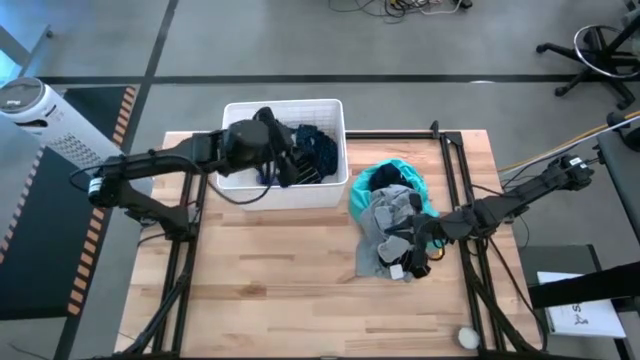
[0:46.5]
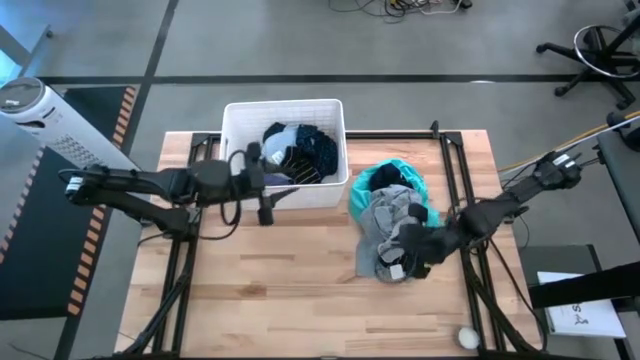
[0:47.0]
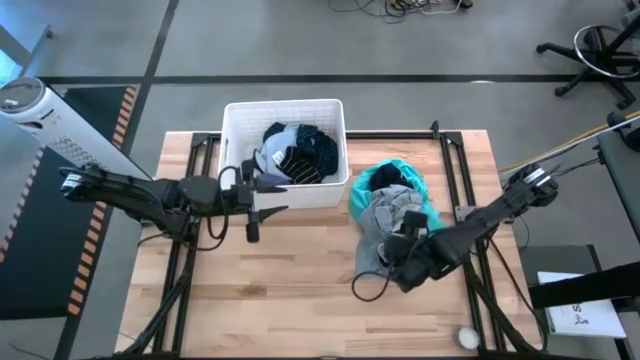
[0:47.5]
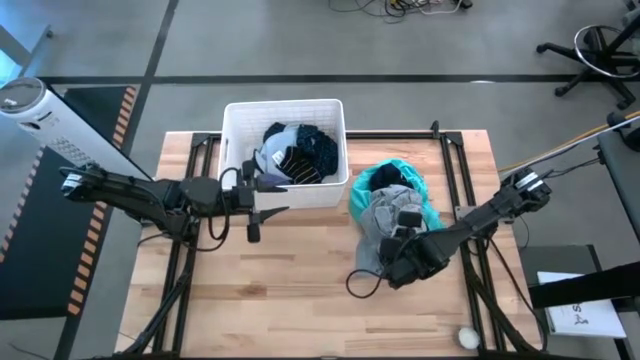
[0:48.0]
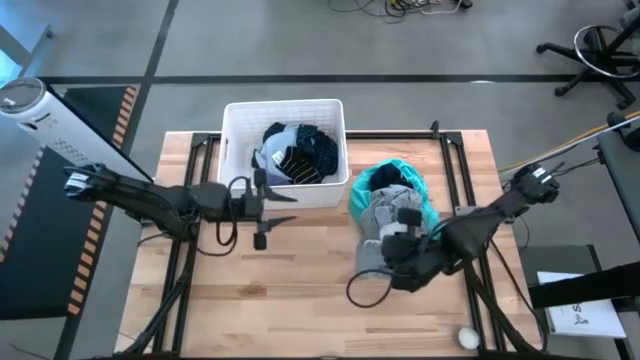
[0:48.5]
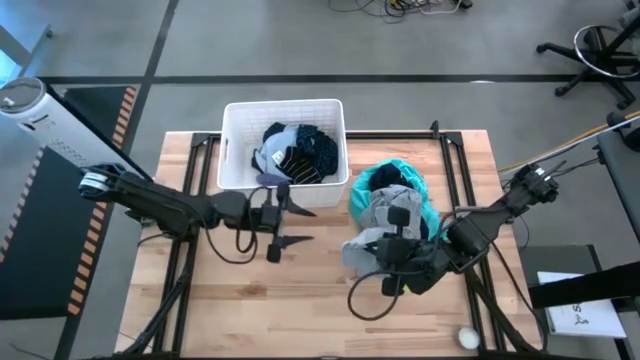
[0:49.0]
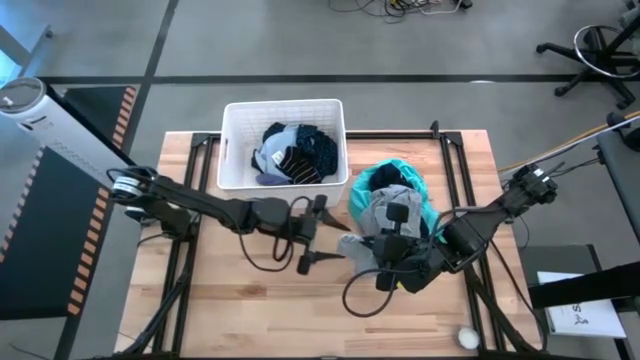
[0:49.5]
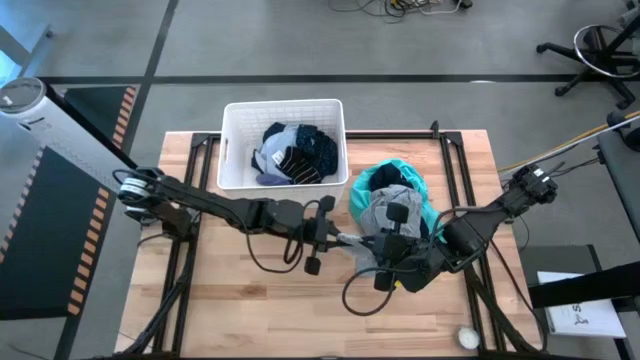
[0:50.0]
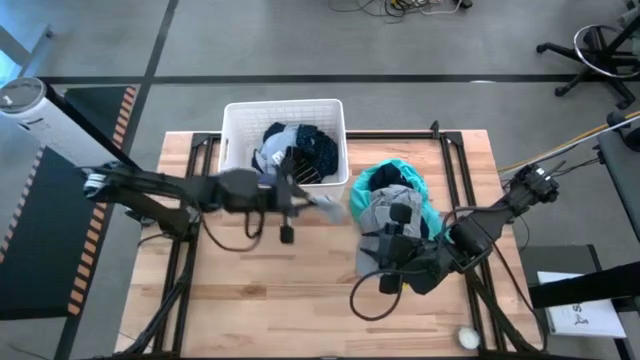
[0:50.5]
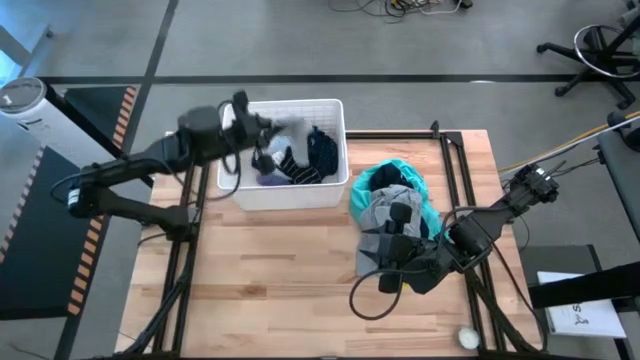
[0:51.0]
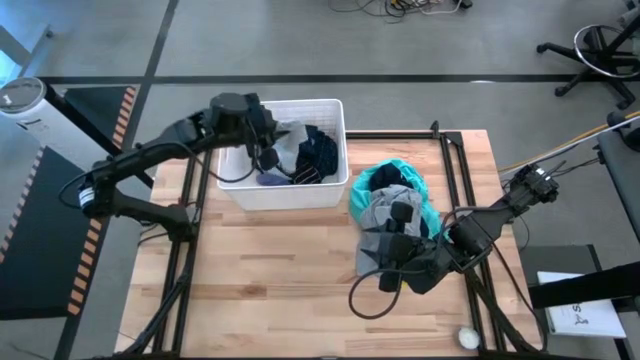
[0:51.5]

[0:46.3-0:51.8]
Task: Sort clothes
Put the gray sock into the white laundry bin

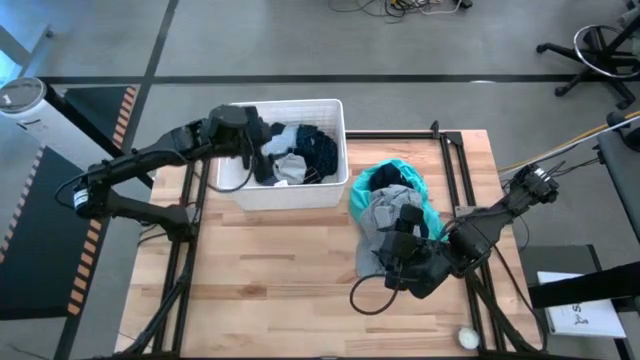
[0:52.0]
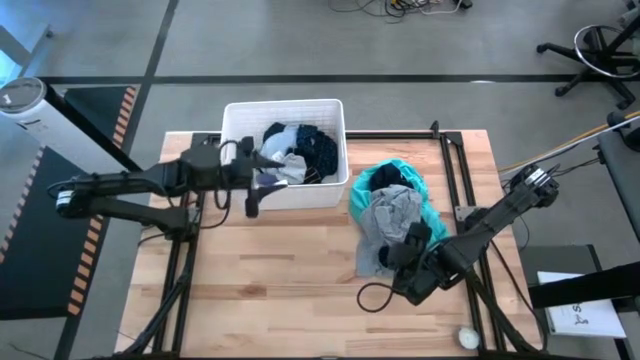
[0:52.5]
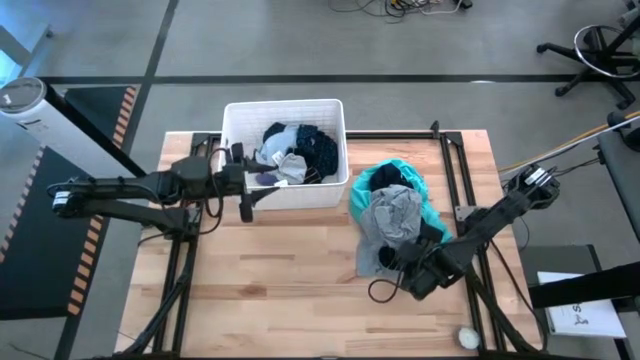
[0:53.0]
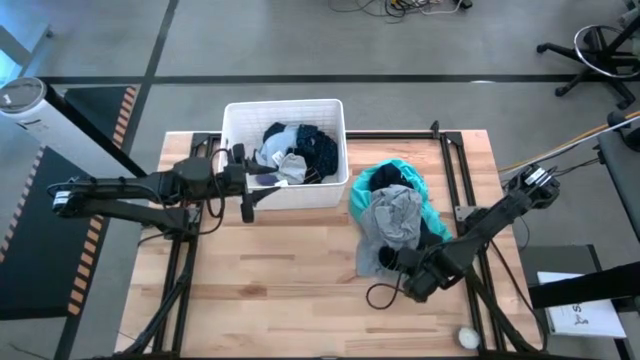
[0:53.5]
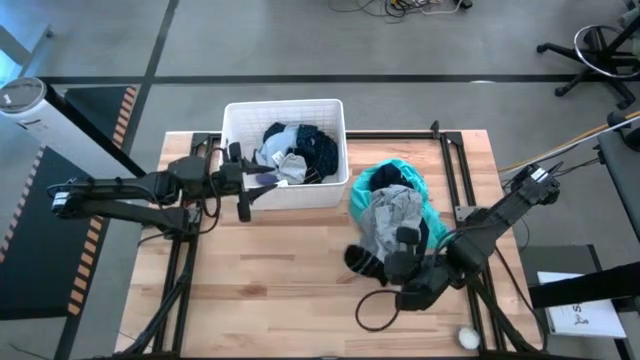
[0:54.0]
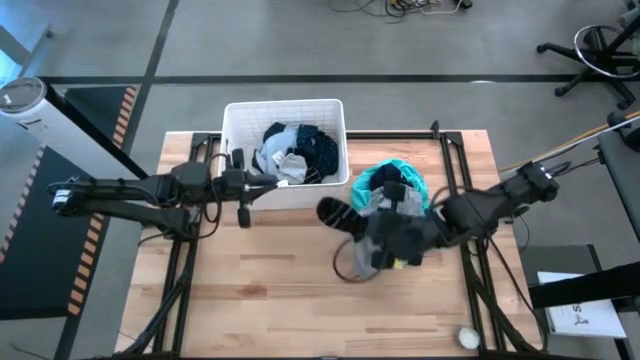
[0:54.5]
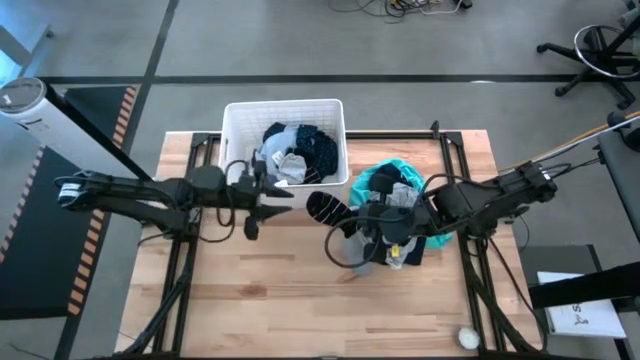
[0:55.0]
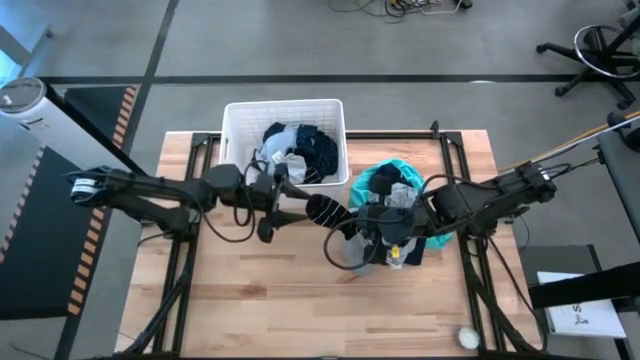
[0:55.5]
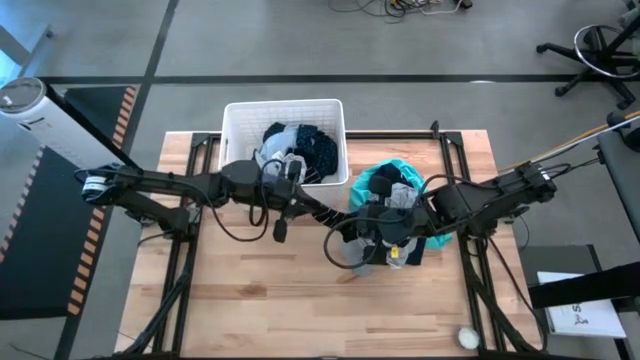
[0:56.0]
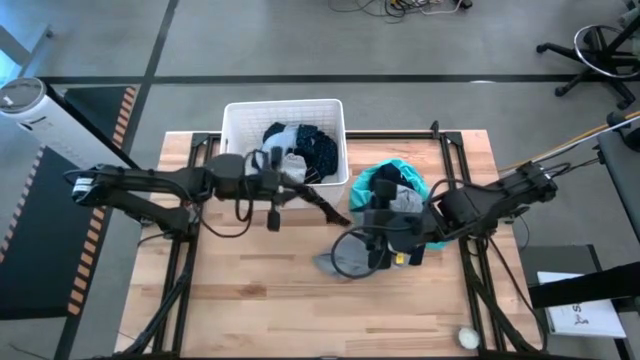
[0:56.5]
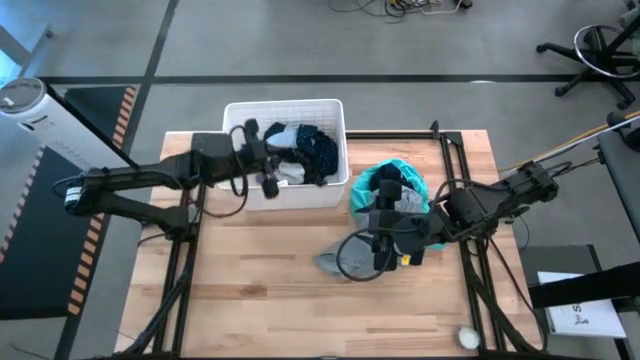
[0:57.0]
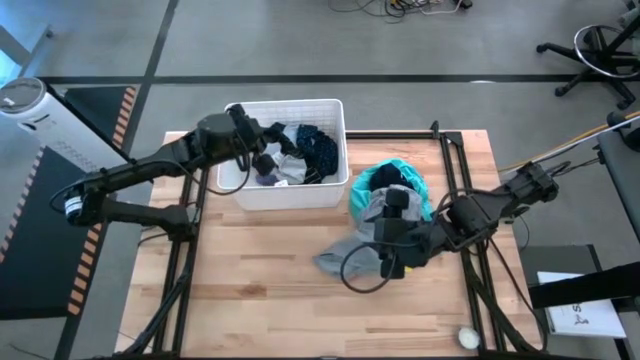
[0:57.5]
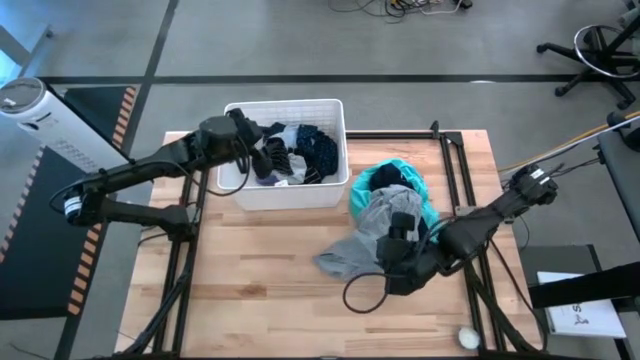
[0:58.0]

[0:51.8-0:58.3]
Put the black sock into the white laundry bin

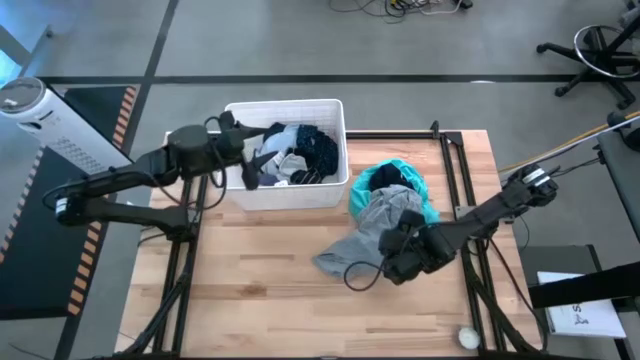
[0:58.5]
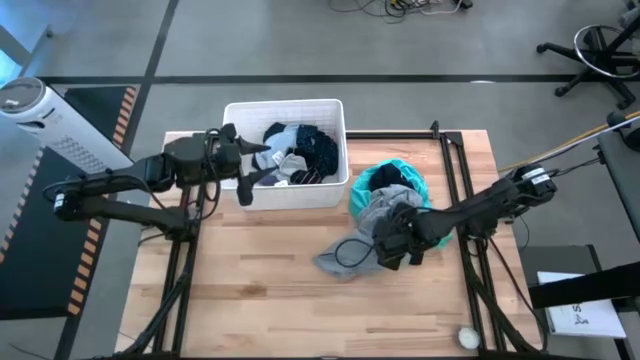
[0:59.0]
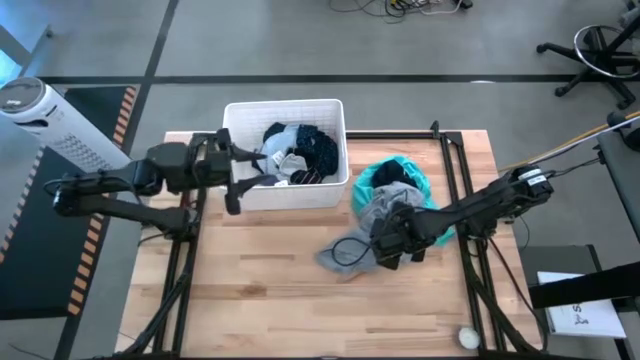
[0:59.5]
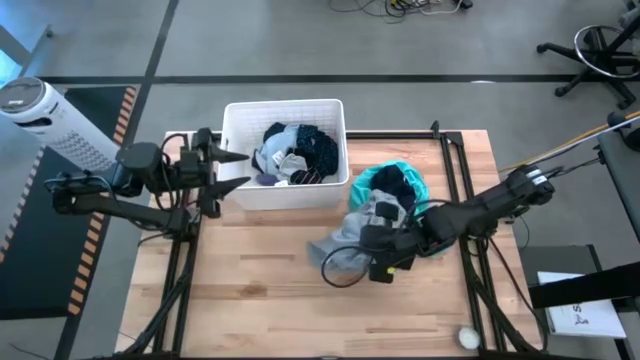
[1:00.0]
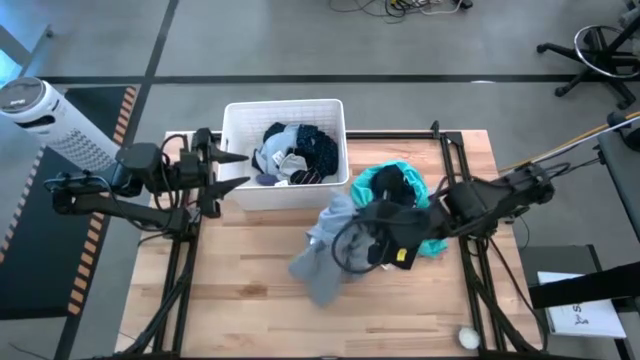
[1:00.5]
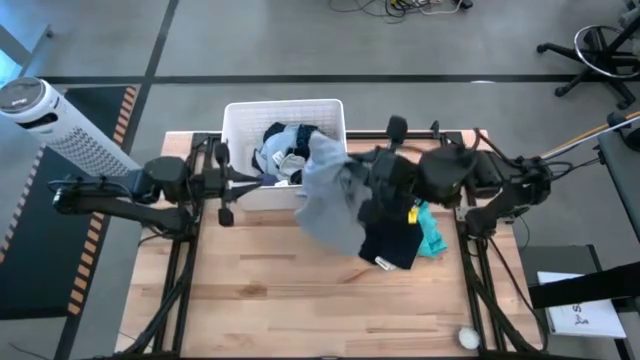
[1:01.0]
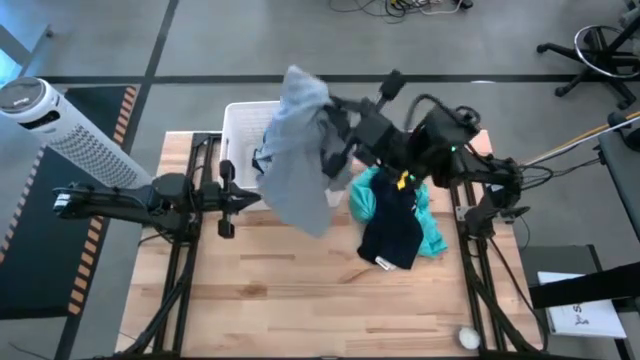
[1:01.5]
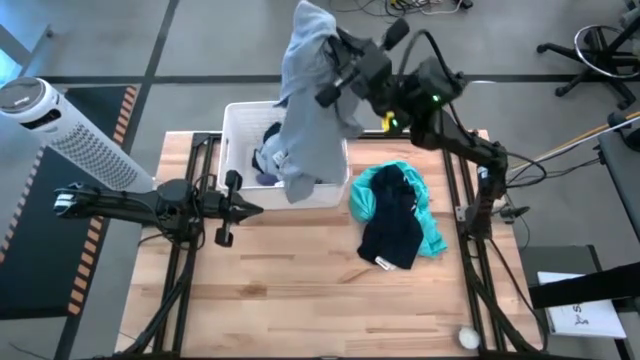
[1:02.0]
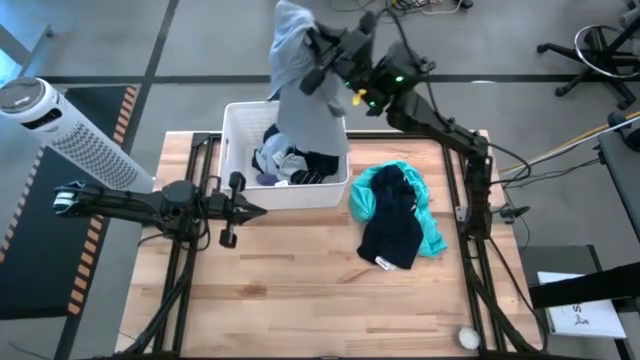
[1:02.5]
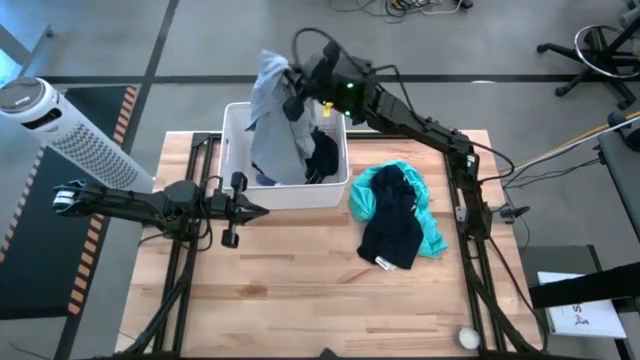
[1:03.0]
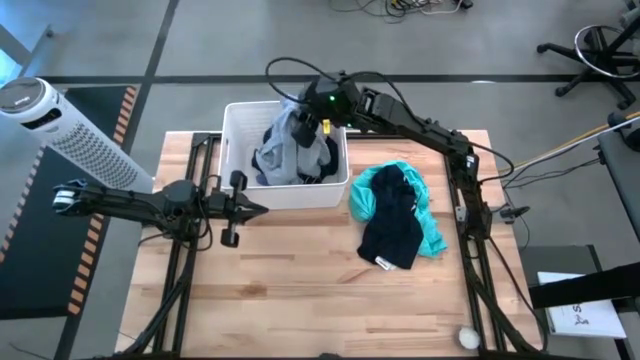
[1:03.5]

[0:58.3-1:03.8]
Put the gray shirt into the white laundry bin

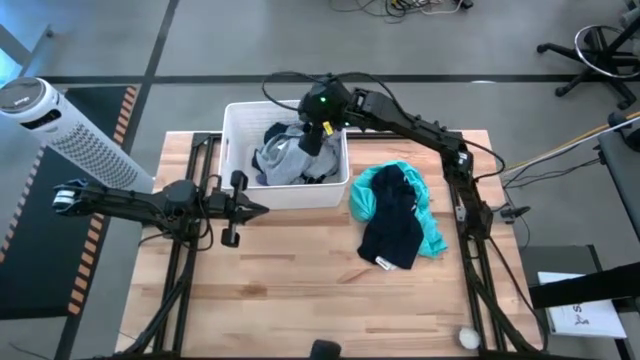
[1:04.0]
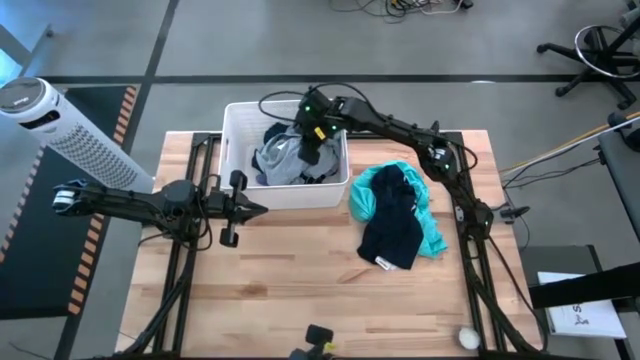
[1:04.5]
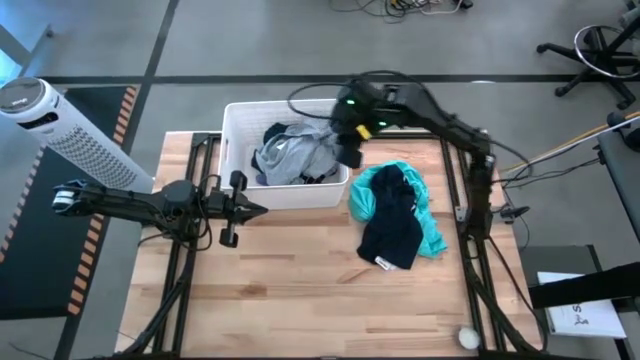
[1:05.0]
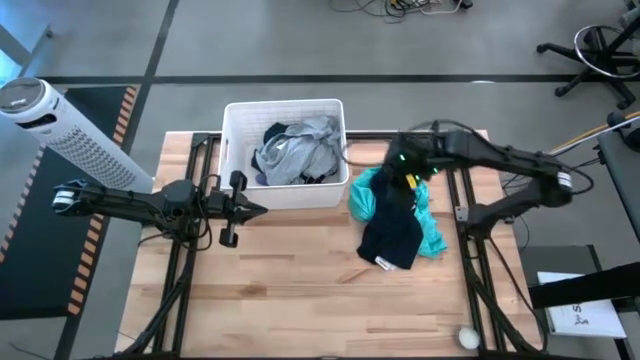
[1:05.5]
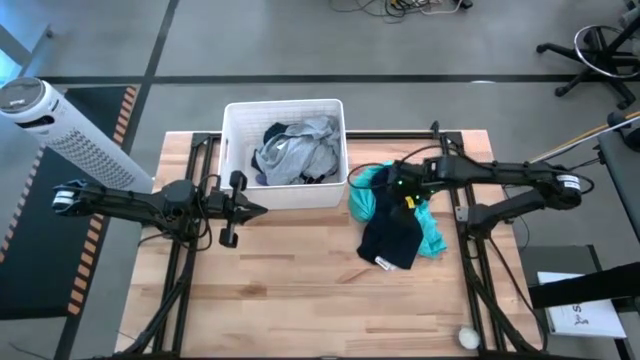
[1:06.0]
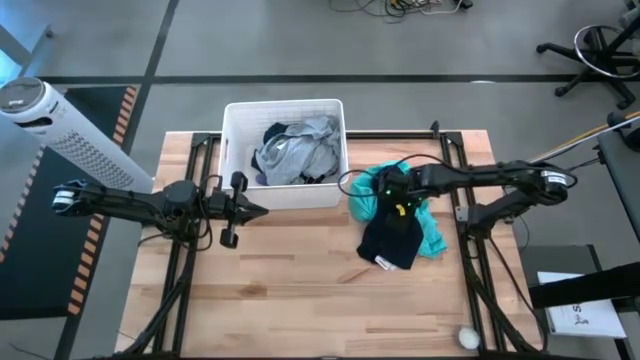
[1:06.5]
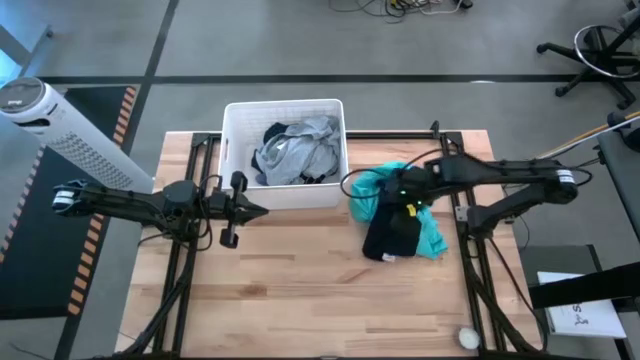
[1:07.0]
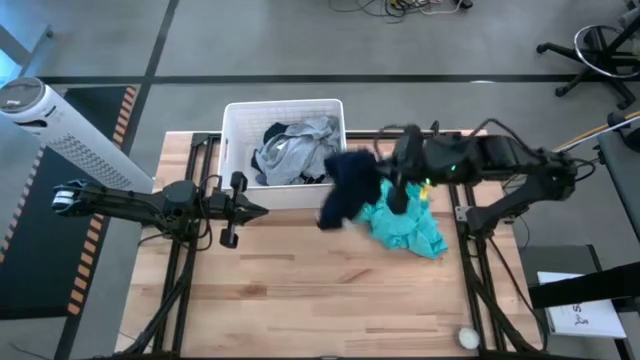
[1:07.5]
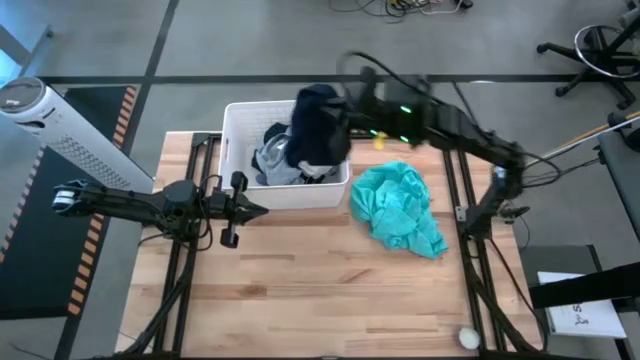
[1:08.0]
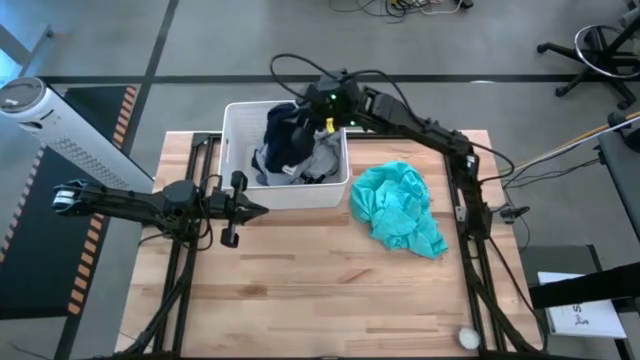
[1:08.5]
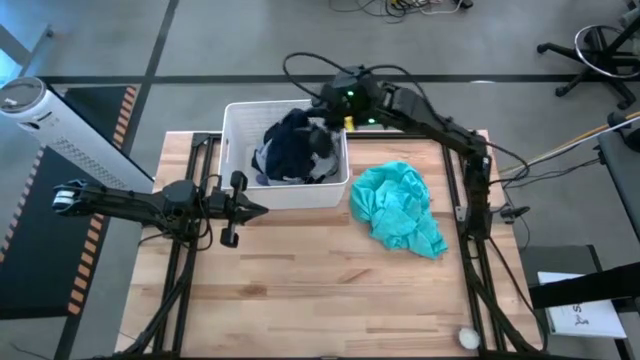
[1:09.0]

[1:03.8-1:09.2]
Put the dark blue boxer shorts into the white laundry bin
